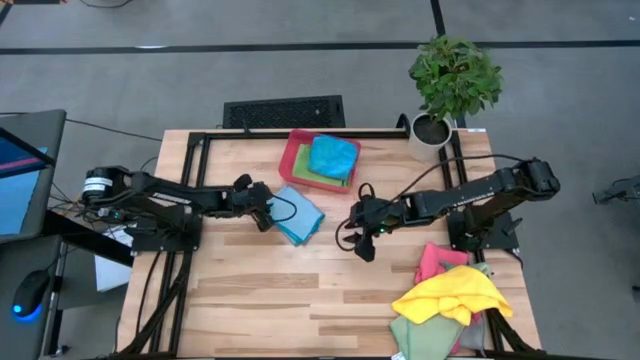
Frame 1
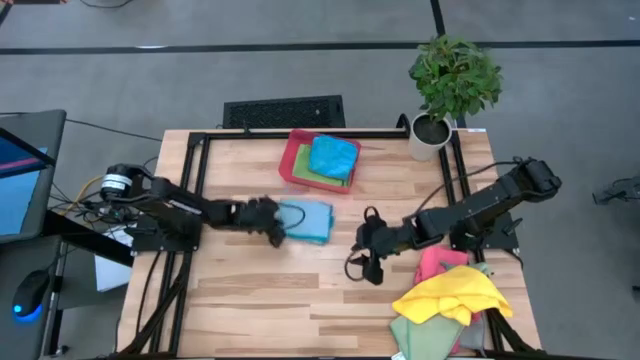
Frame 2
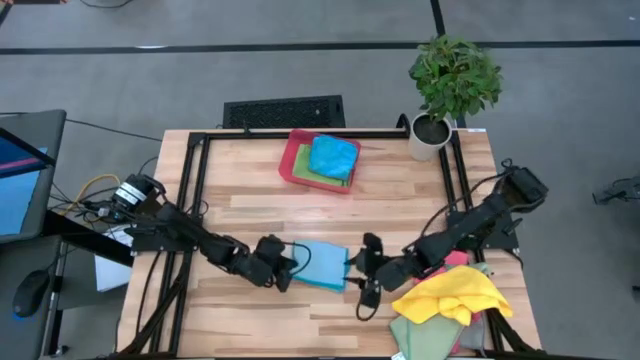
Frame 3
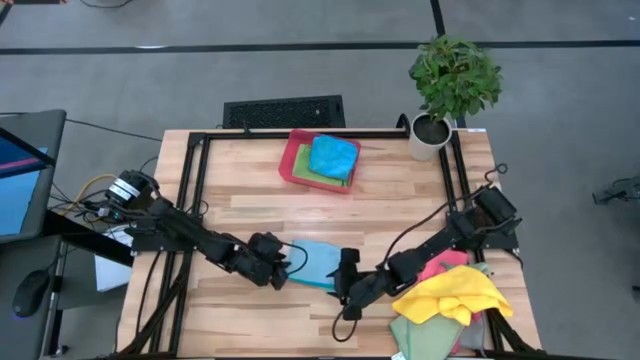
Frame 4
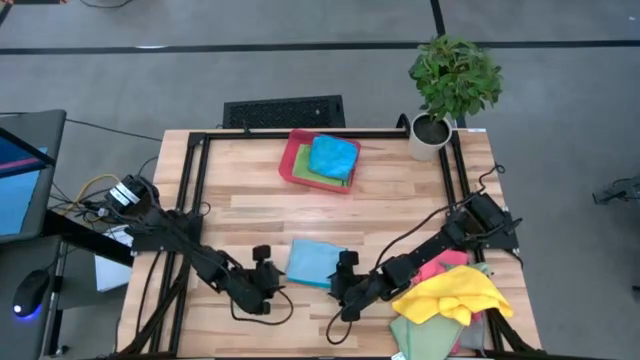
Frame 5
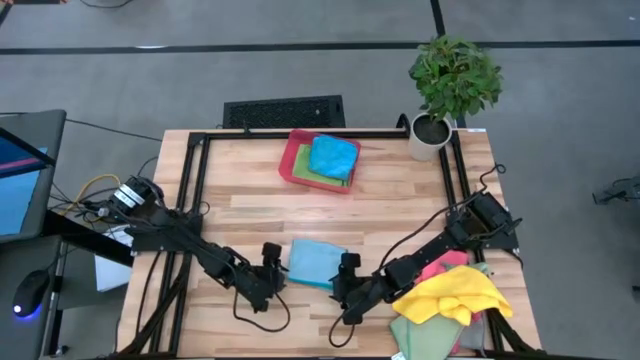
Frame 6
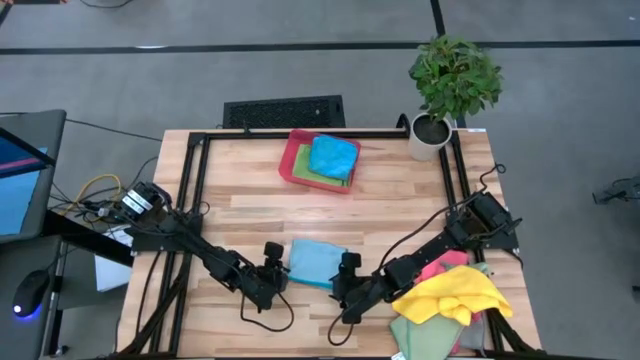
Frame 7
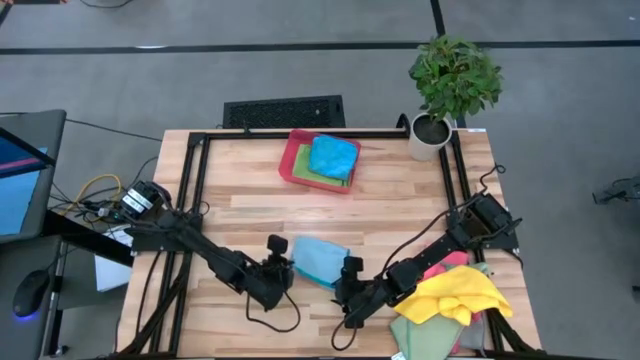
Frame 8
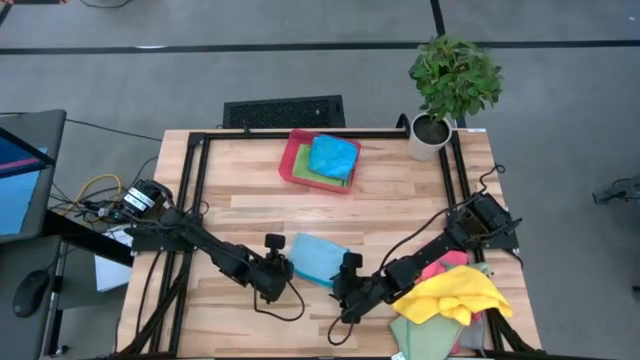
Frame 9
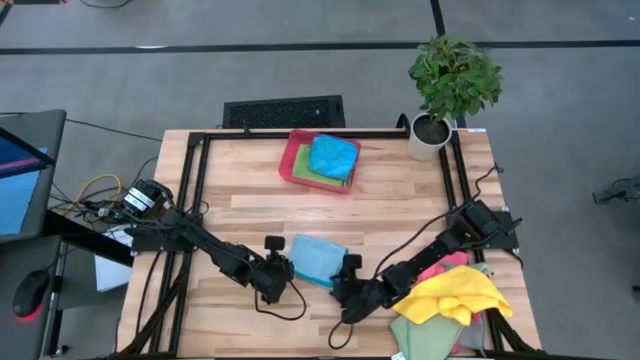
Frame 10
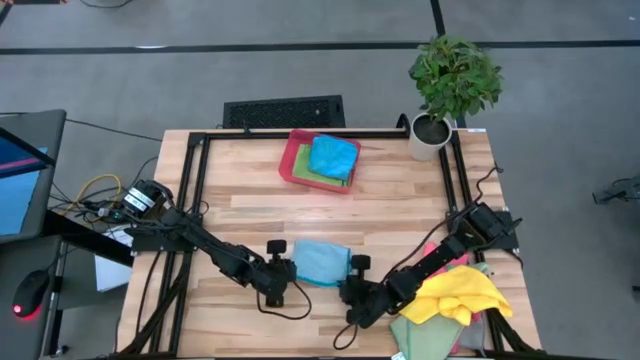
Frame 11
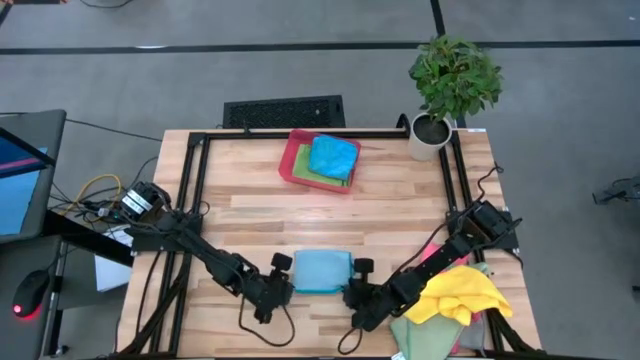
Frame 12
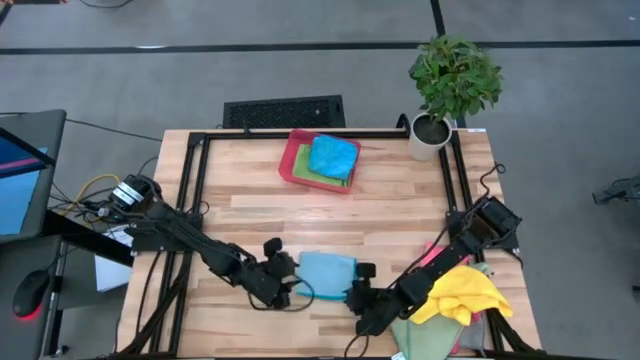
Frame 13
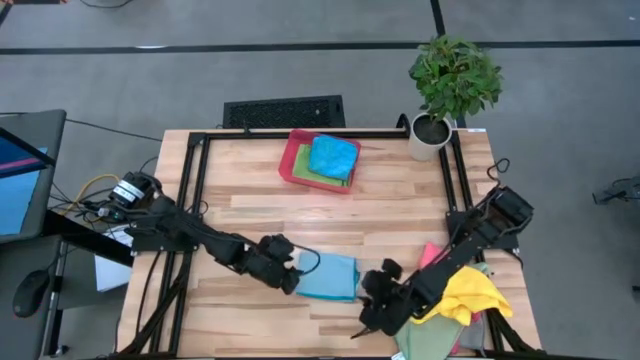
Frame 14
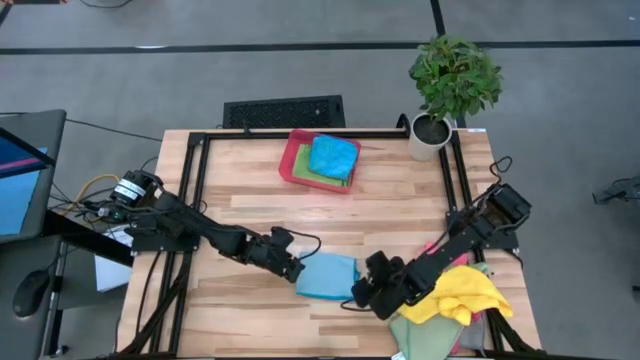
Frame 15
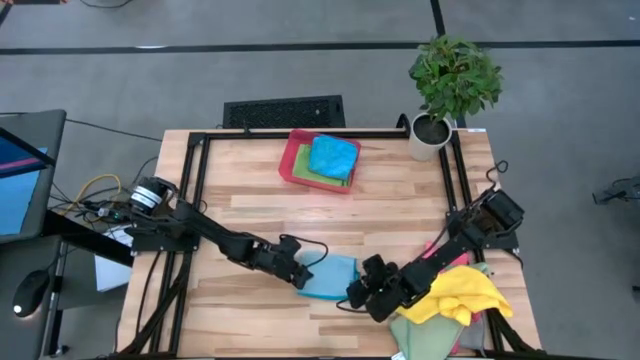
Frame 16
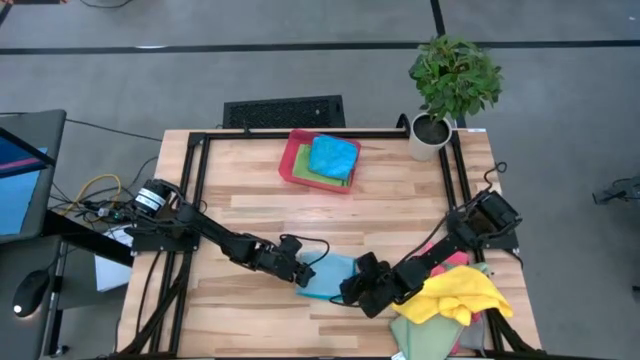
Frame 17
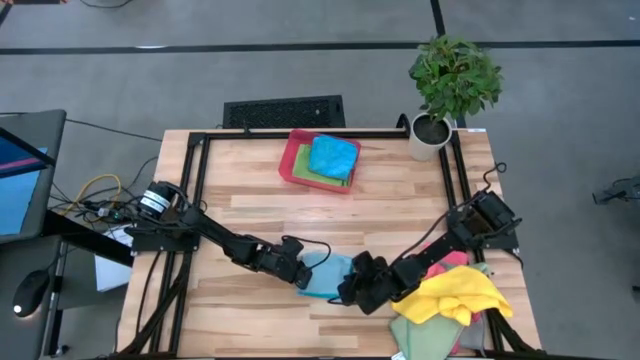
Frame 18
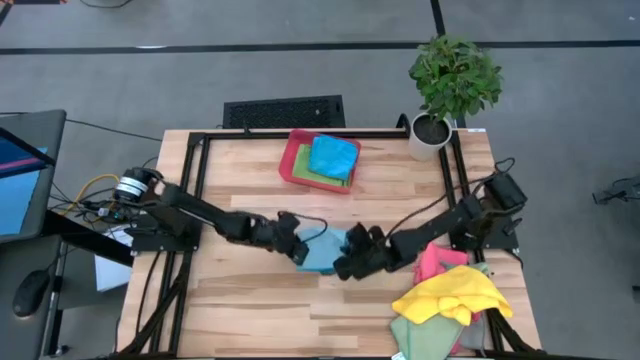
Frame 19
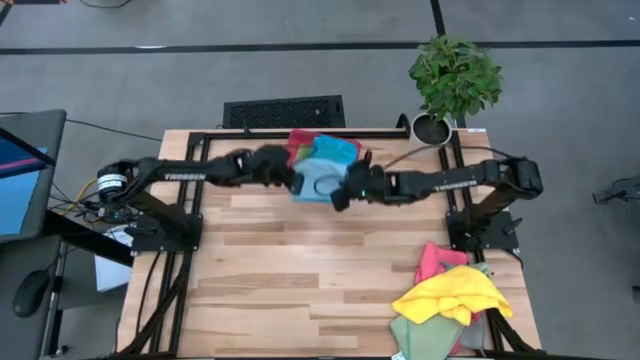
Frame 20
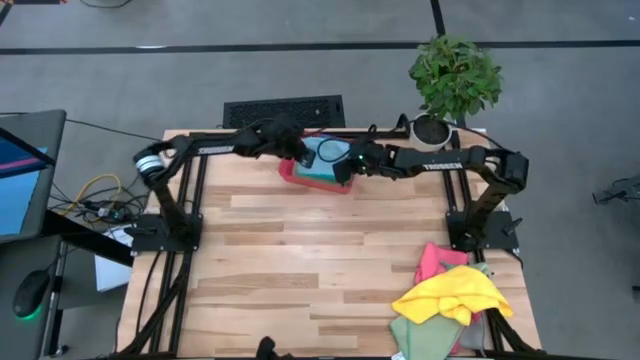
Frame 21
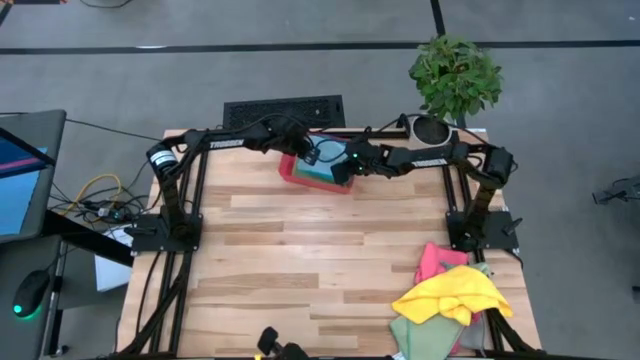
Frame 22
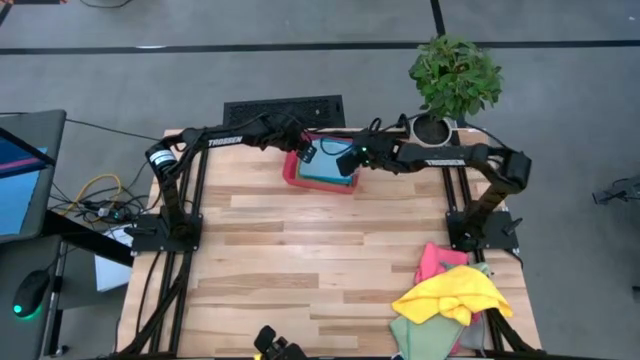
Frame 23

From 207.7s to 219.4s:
Task: Fold microfiber towels
Stack the light blue microfiber cloth on top of the blue microfiber cloth in the red bin

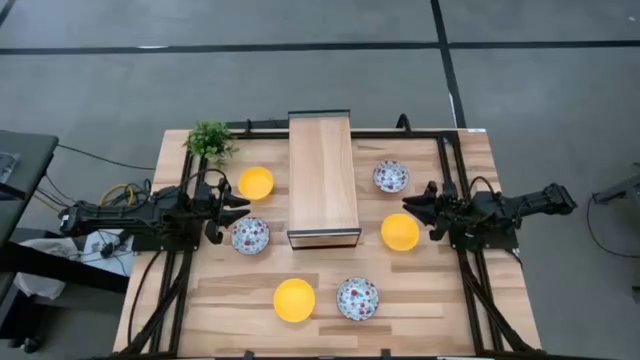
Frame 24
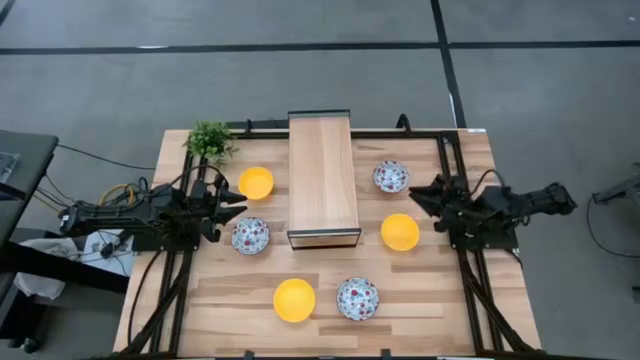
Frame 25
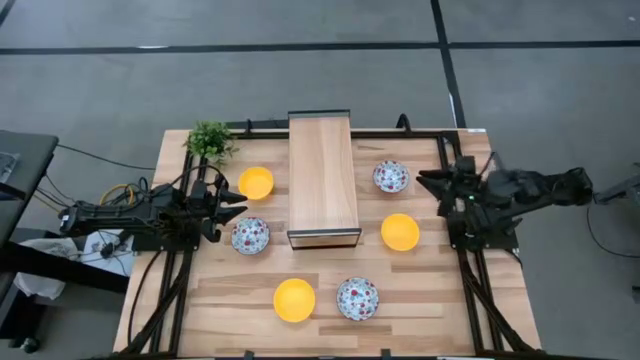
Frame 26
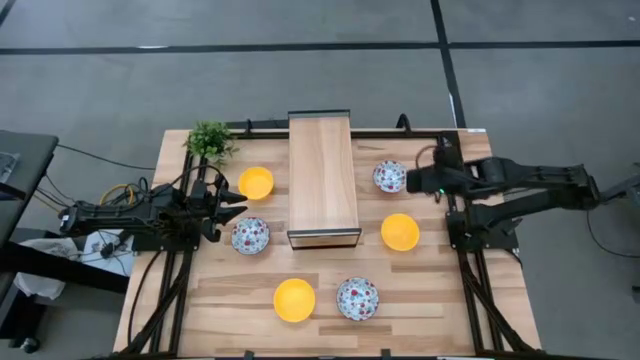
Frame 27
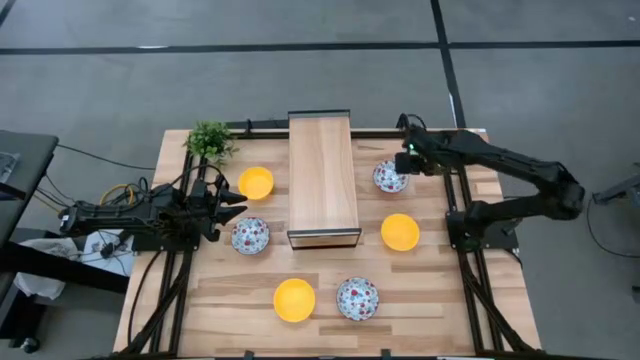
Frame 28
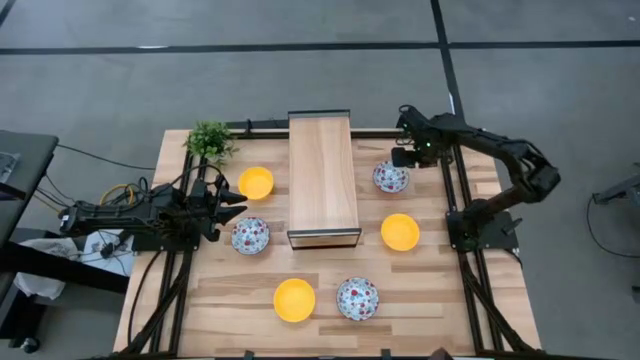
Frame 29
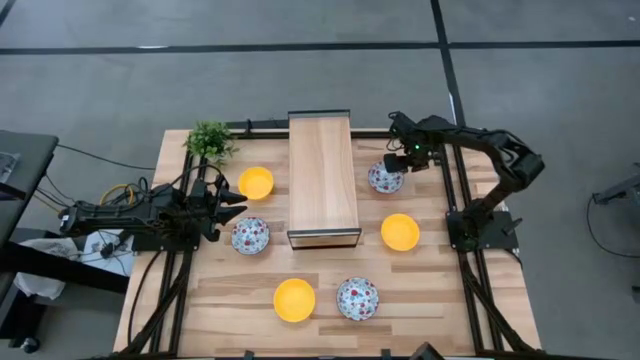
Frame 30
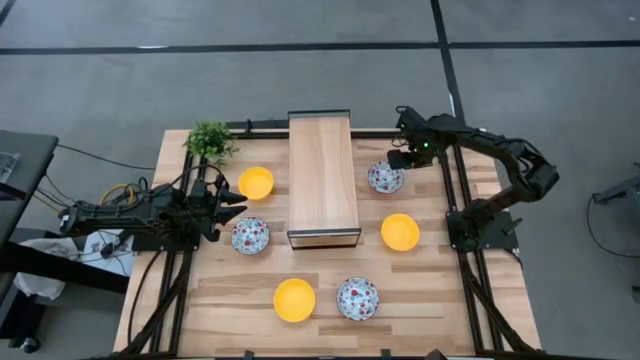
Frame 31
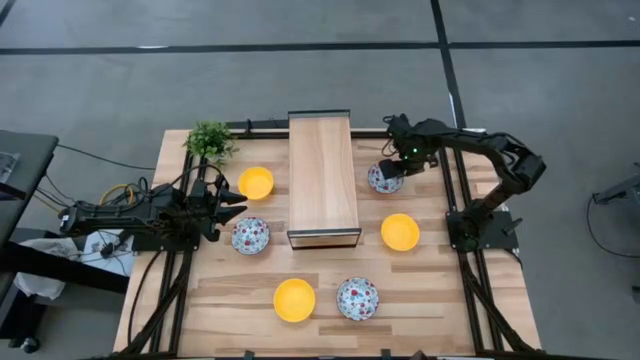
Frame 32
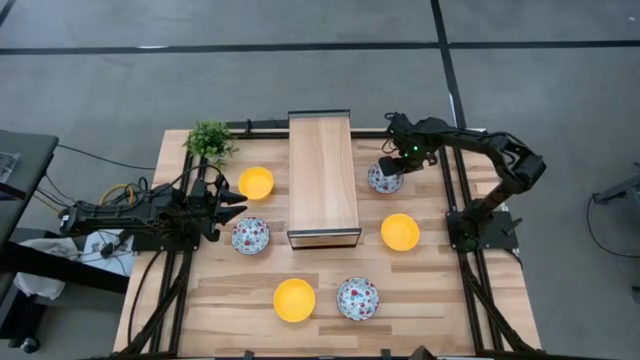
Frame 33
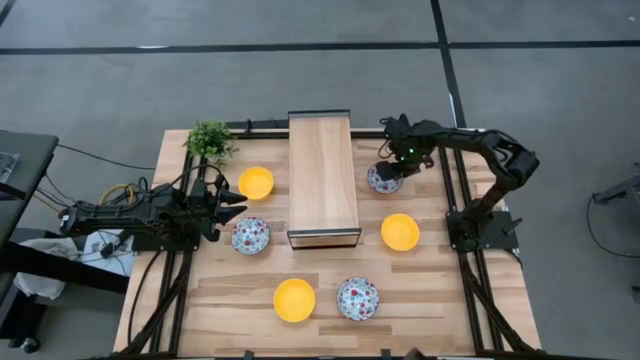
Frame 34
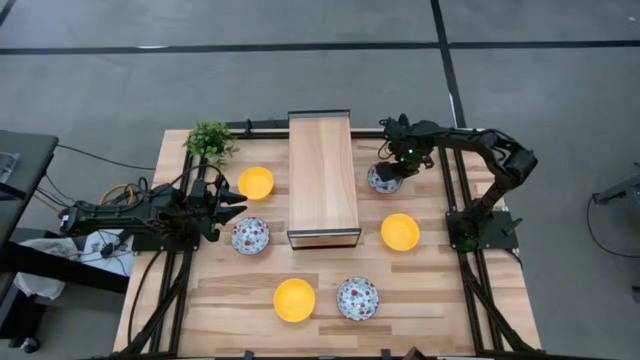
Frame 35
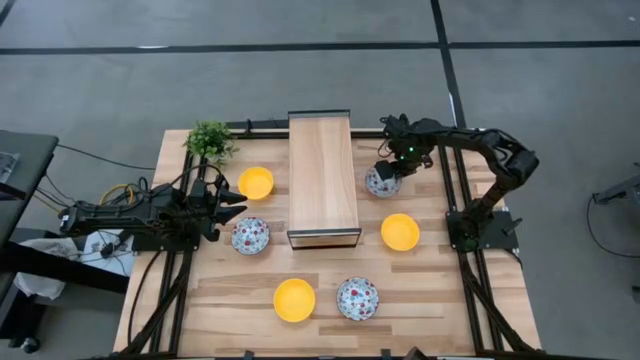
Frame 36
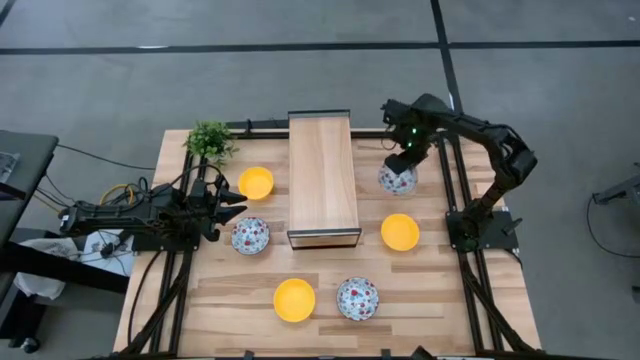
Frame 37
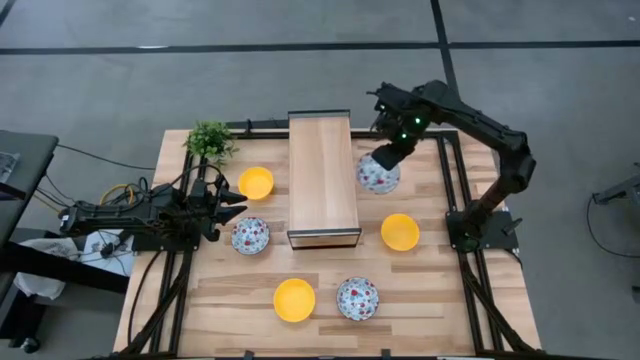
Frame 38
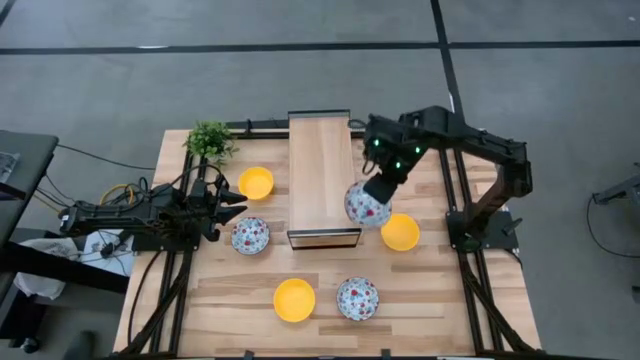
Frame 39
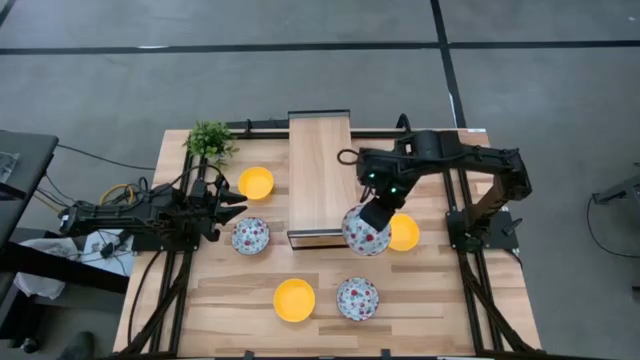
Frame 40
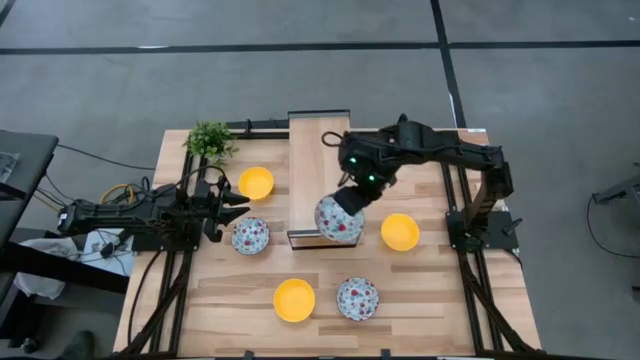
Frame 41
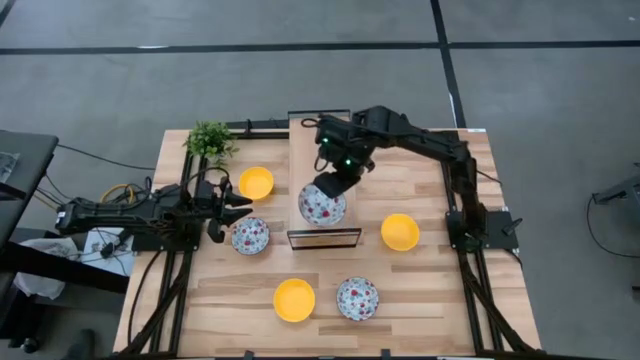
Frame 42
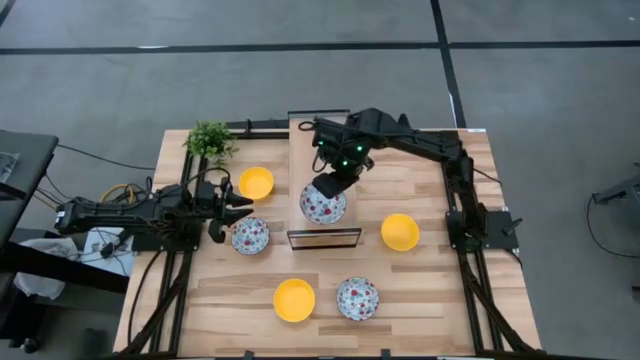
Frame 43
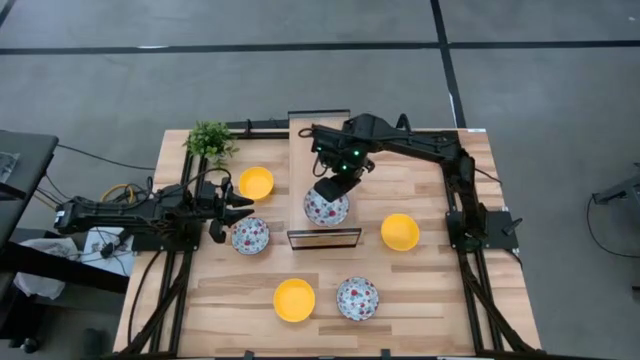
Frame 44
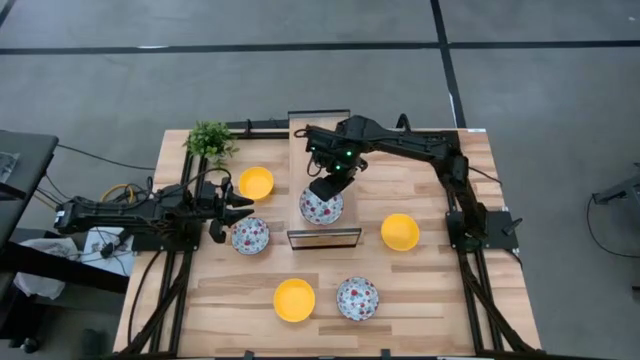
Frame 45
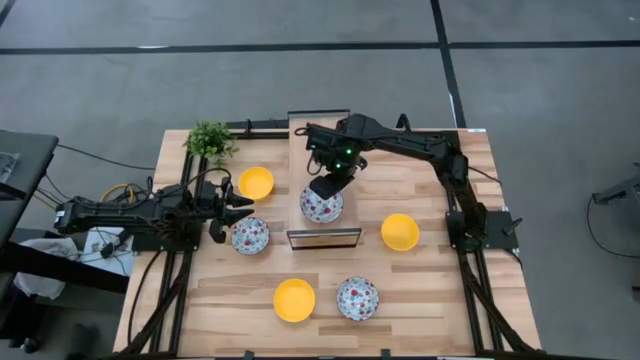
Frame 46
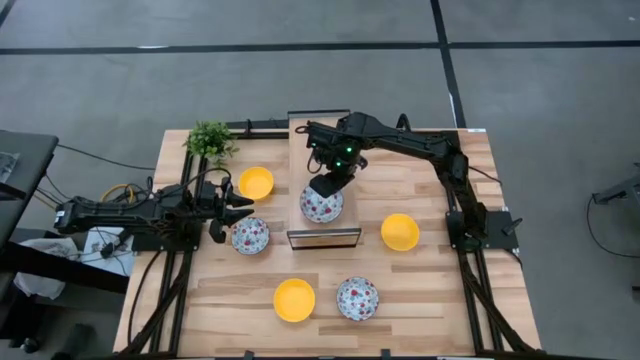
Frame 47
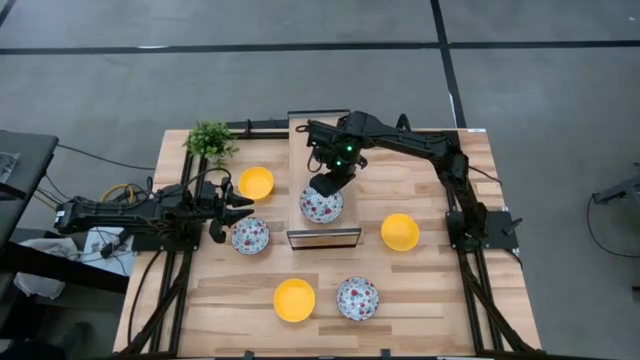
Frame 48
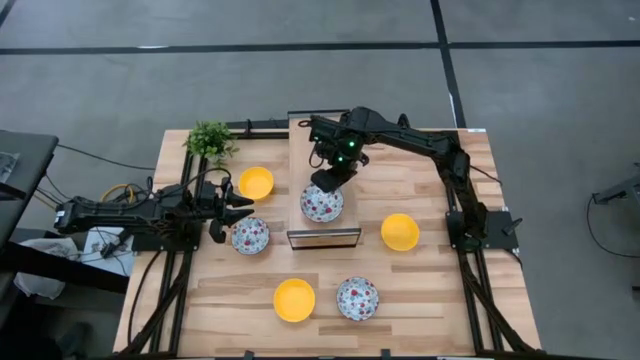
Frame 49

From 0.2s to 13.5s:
Task: Pick & Place Mini bowls
Put the top right white patterned bowl on the shelf
